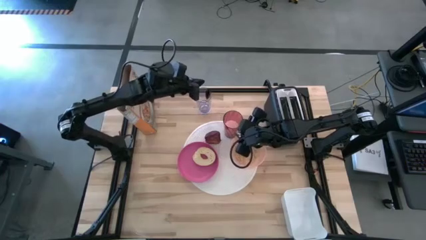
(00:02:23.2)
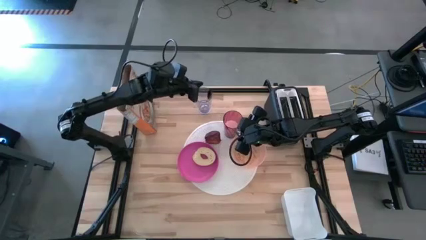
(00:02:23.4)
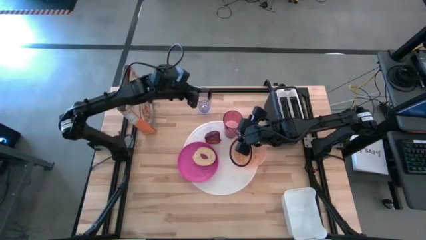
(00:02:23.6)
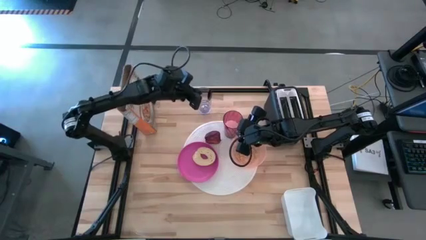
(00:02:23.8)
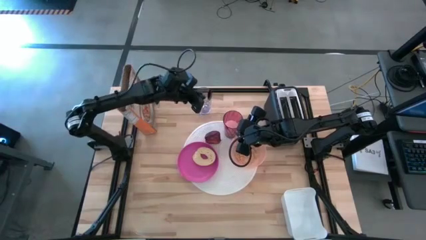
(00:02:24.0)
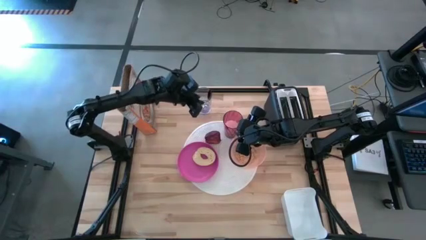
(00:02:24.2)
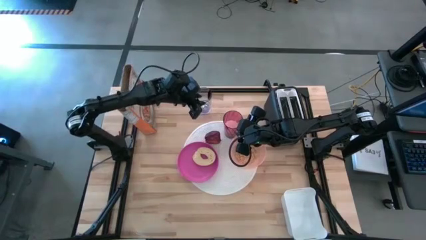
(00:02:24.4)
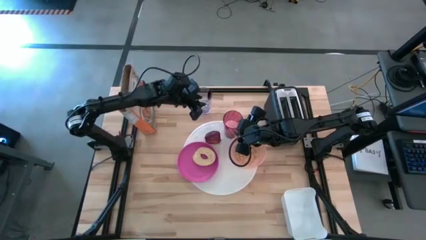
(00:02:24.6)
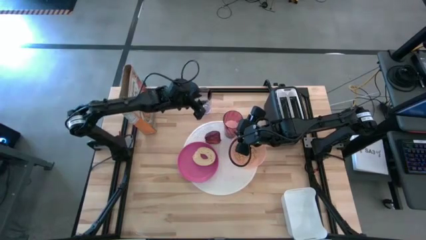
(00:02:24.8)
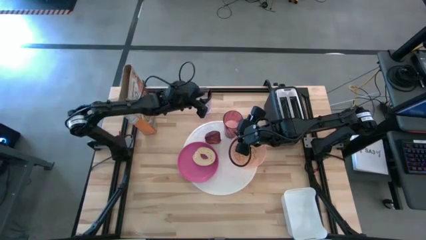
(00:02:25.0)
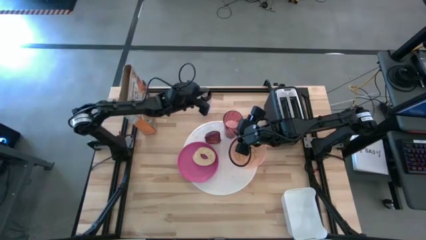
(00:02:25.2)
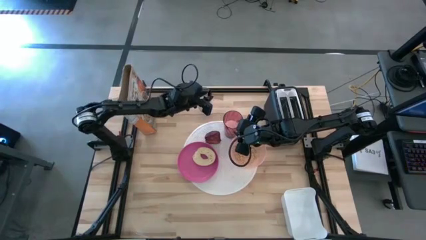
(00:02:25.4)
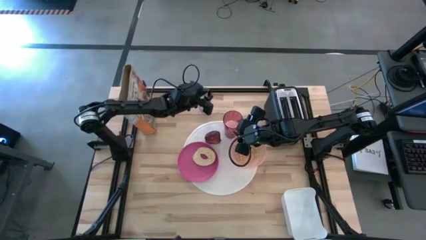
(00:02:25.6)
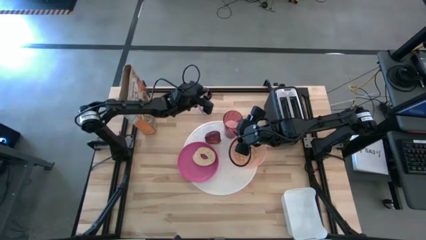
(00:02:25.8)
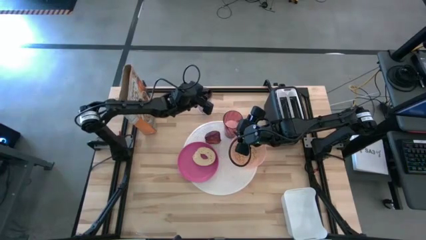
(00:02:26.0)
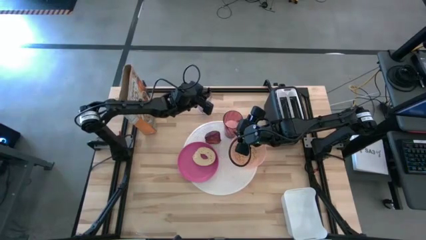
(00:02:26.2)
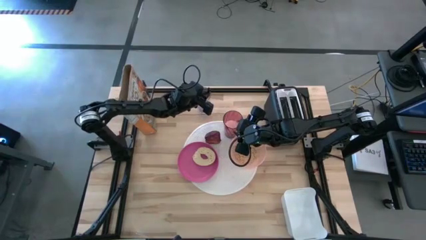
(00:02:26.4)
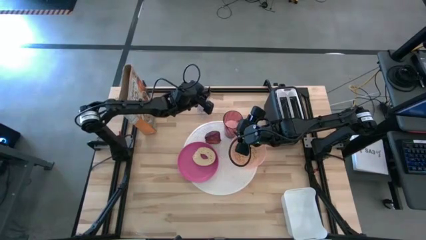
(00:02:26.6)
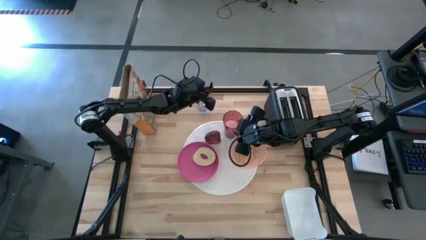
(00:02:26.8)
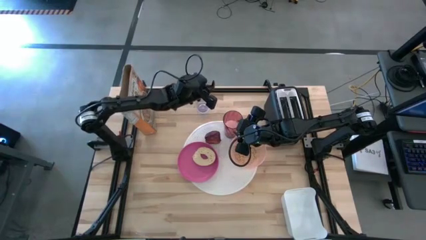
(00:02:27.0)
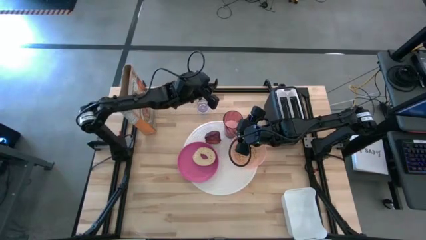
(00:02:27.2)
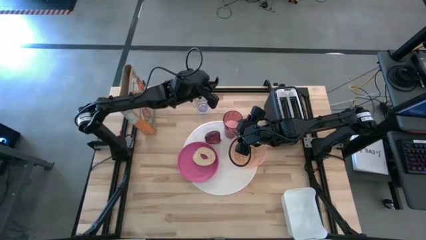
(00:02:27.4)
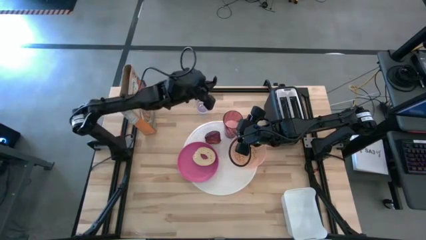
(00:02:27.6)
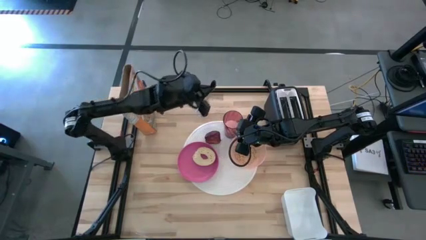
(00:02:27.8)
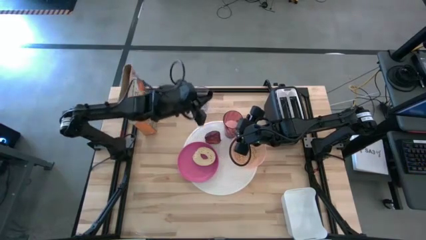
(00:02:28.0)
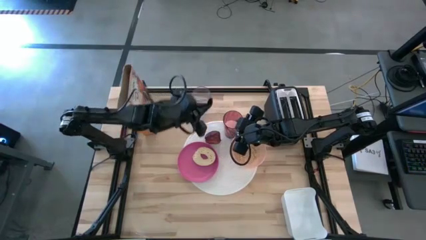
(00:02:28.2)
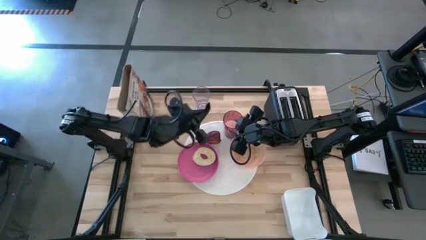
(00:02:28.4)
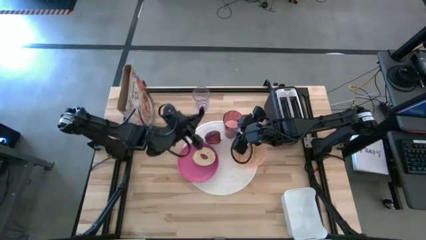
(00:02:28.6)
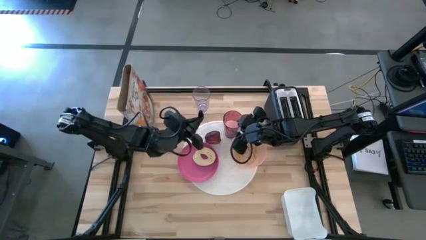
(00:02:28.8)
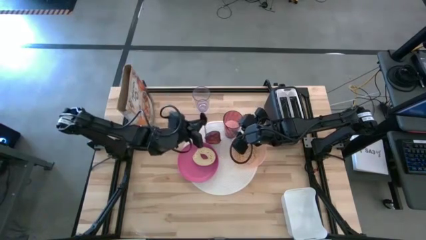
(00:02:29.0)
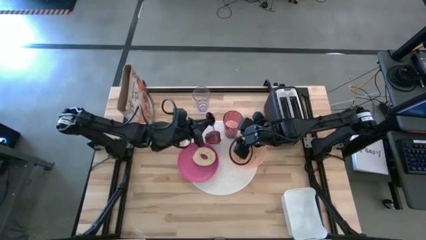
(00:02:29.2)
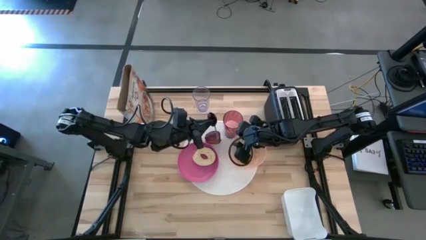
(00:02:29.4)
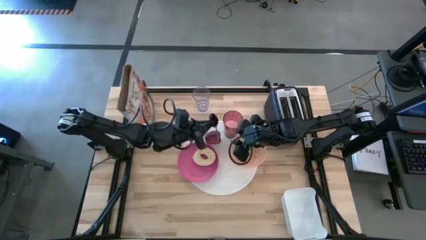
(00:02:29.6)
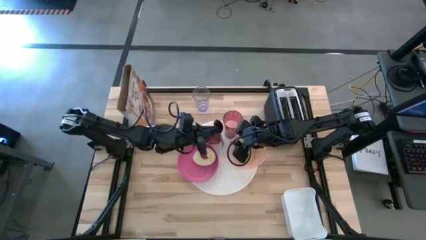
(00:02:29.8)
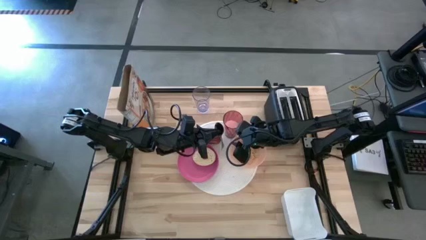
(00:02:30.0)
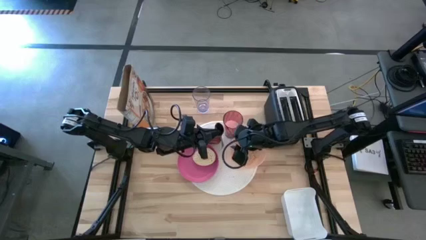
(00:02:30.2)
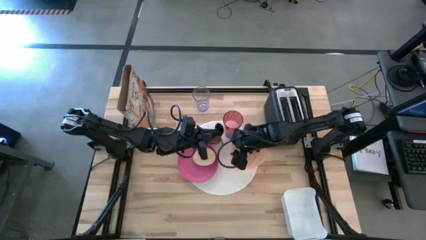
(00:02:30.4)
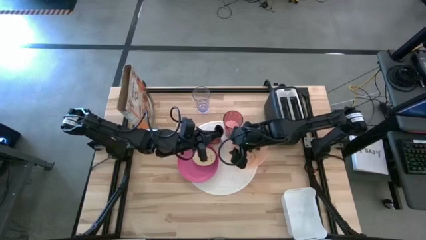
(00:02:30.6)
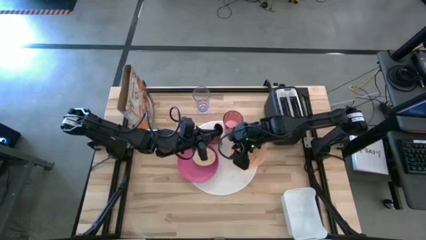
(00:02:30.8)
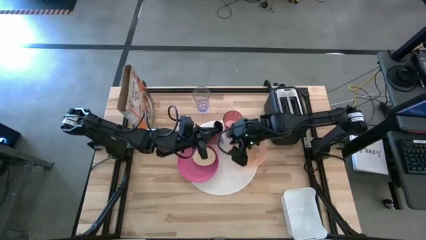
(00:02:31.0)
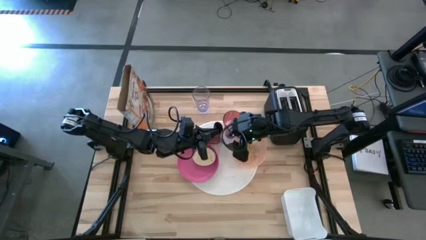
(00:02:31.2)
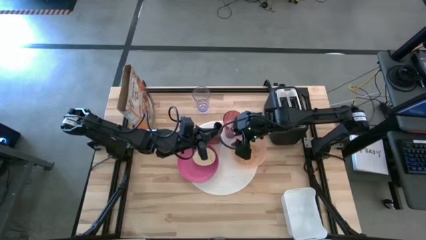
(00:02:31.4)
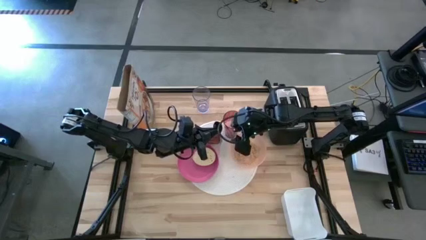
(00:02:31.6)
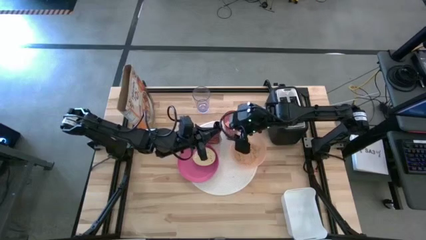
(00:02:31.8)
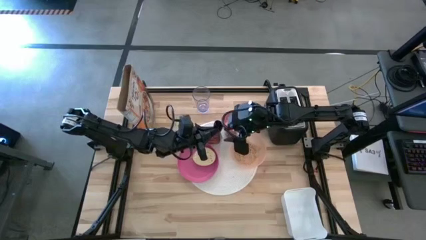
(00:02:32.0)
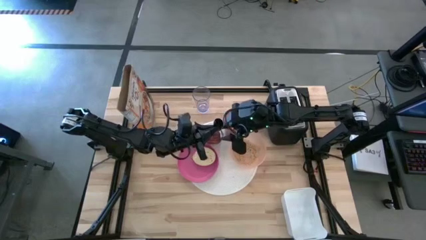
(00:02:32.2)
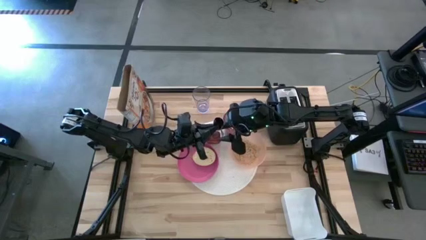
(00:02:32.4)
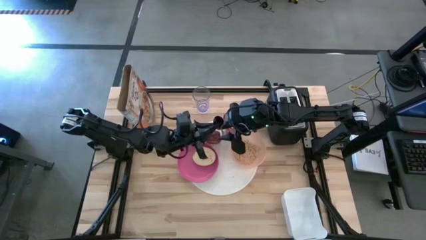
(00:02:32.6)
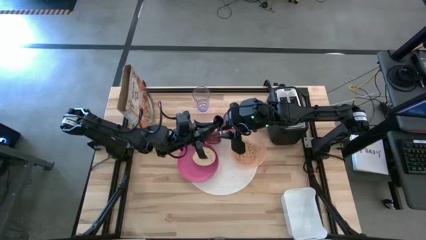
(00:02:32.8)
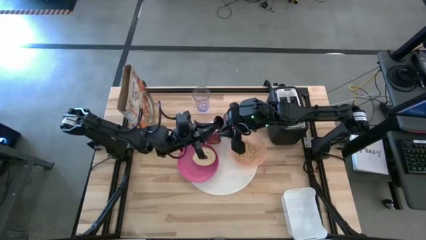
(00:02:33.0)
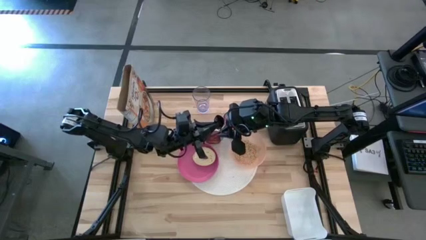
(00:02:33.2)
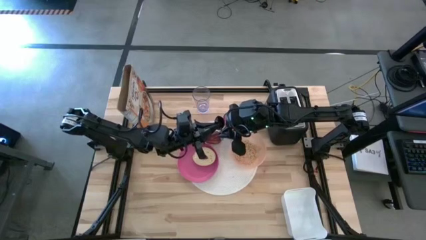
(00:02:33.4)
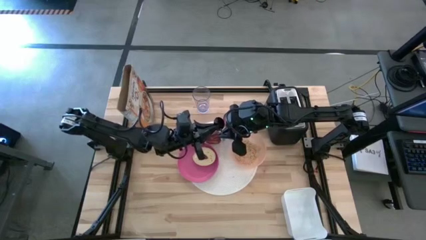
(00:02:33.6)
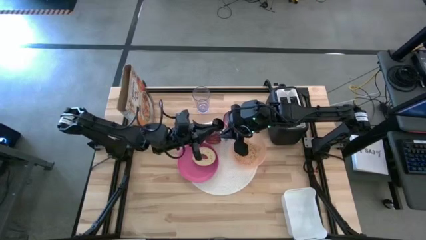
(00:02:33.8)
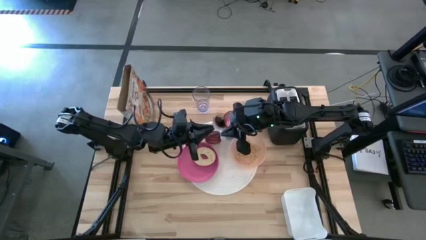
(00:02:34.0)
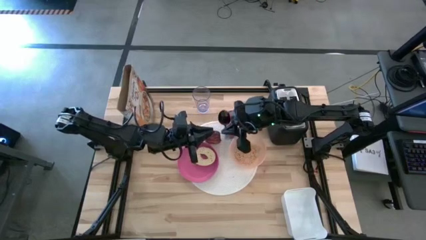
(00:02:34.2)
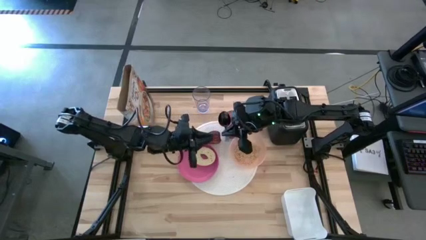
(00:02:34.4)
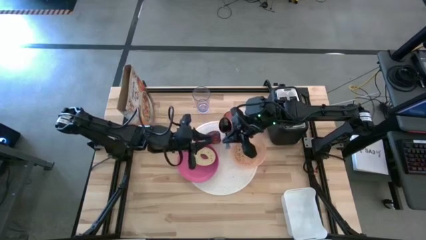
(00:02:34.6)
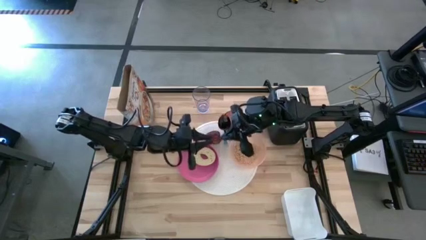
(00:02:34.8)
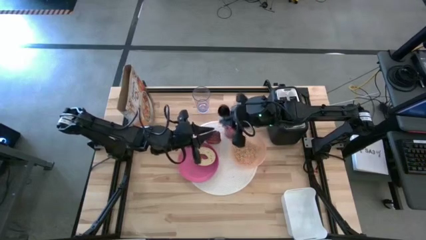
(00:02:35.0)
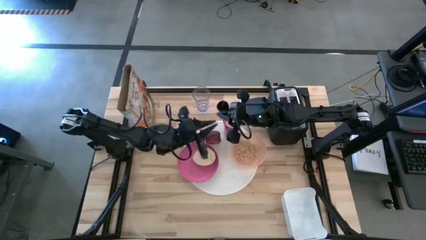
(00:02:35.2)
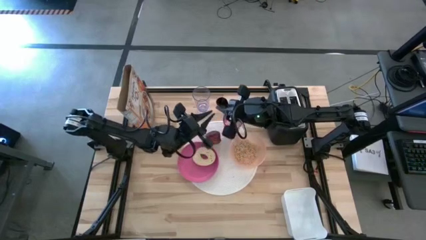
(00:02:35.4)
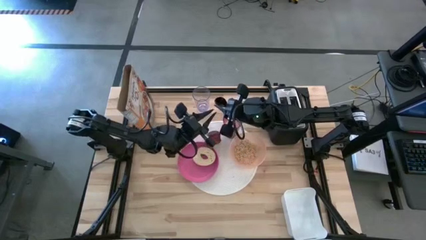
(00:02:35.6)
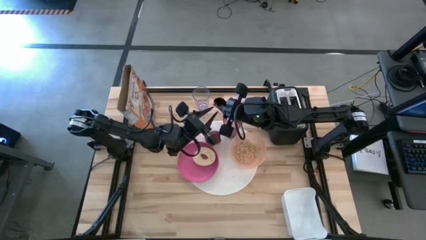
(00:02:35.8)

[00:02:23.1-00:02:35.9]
Task: Arrange a breakfast setting
Put the blue spoon on the right side of the white place mat
